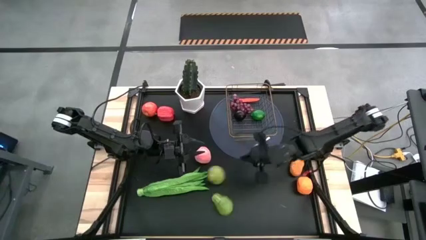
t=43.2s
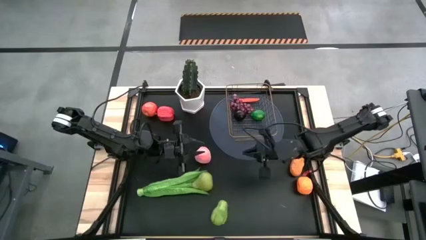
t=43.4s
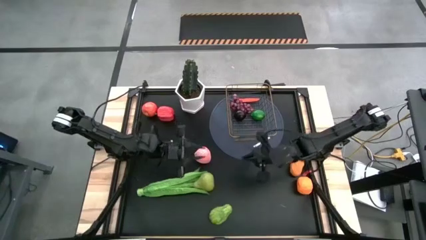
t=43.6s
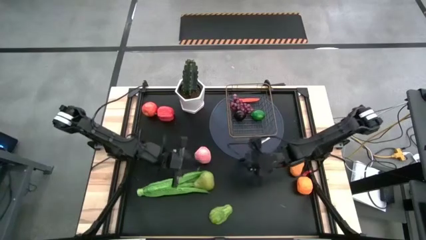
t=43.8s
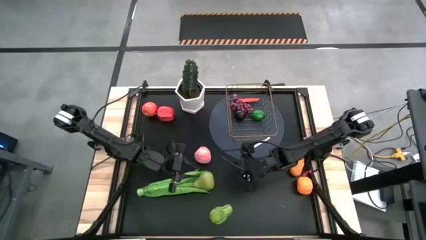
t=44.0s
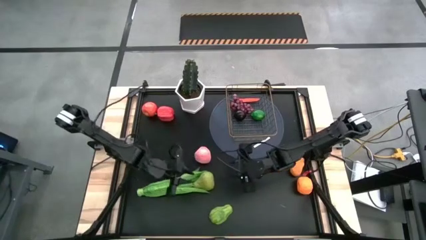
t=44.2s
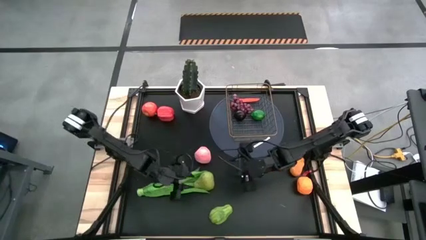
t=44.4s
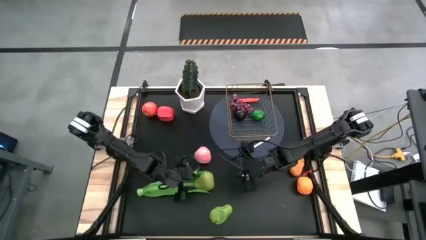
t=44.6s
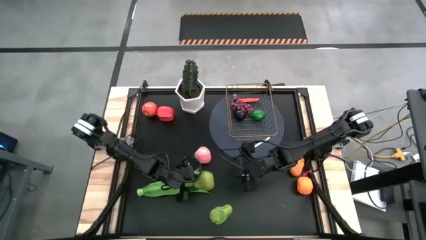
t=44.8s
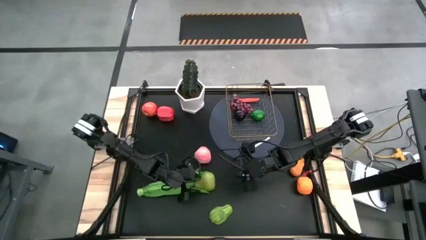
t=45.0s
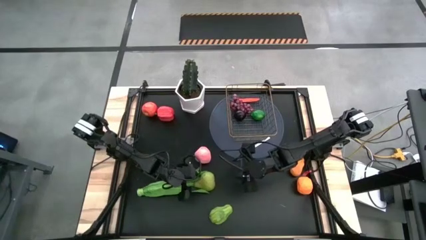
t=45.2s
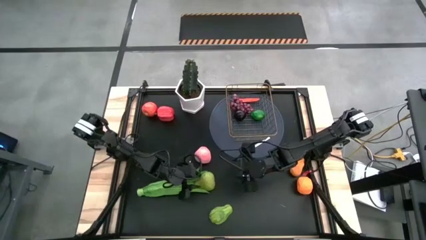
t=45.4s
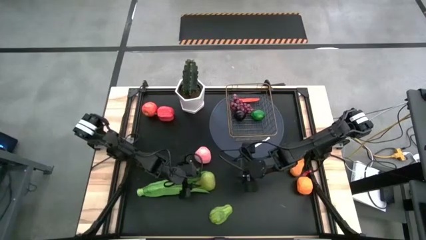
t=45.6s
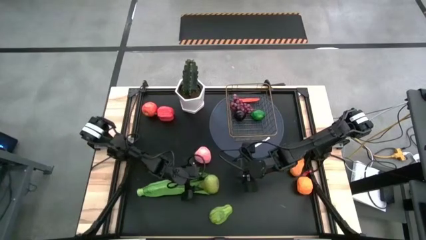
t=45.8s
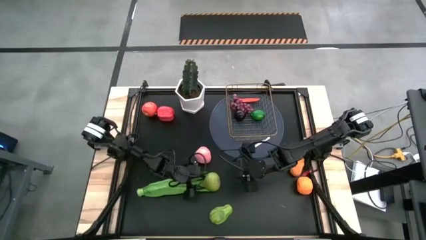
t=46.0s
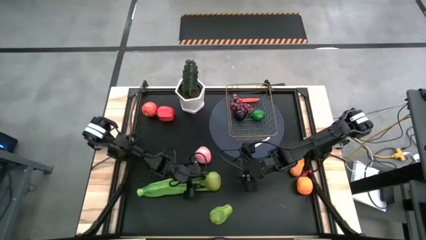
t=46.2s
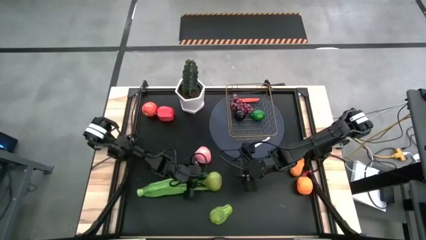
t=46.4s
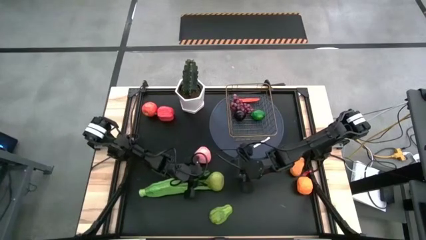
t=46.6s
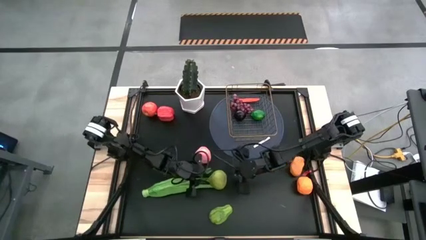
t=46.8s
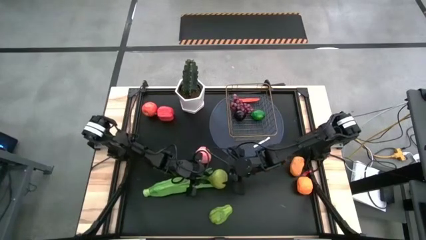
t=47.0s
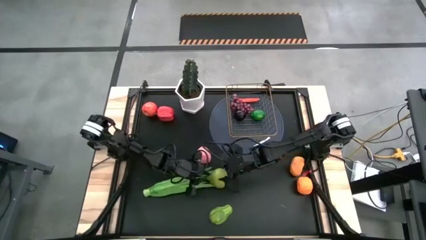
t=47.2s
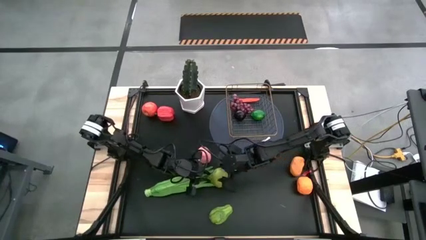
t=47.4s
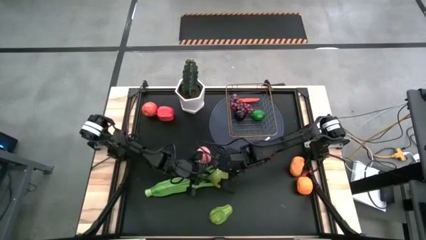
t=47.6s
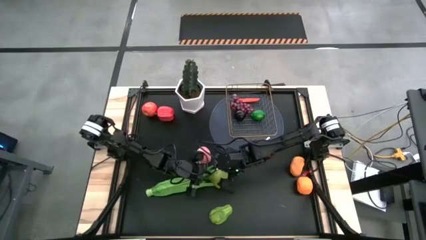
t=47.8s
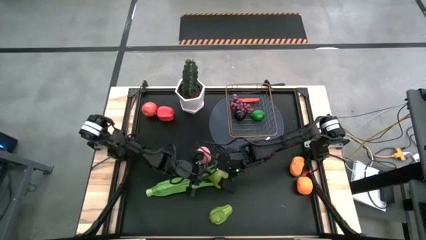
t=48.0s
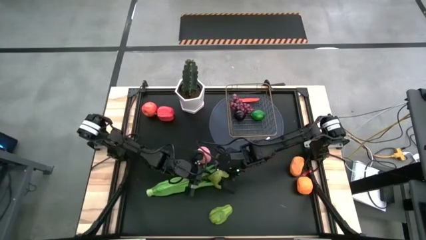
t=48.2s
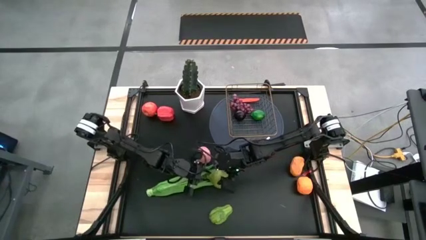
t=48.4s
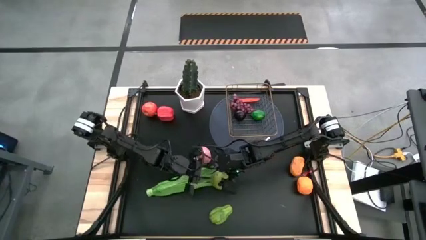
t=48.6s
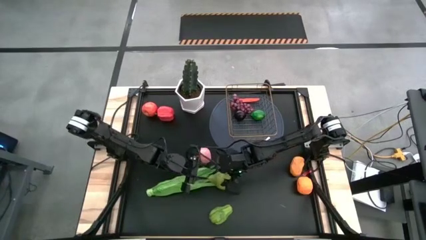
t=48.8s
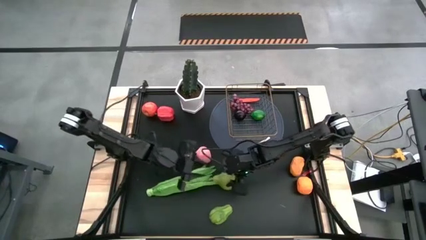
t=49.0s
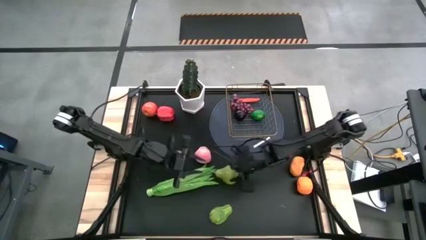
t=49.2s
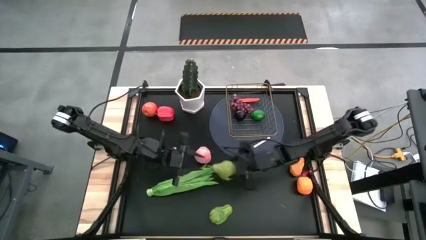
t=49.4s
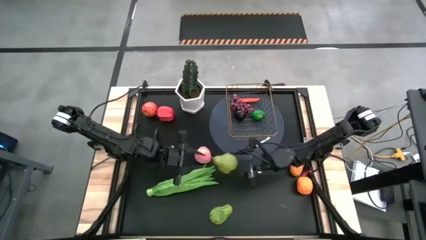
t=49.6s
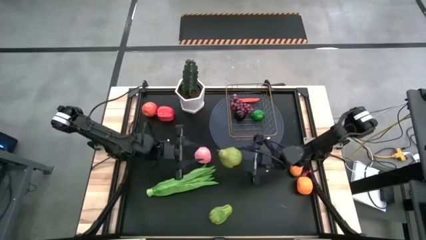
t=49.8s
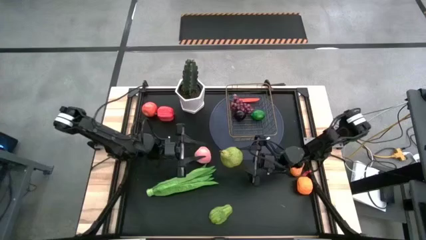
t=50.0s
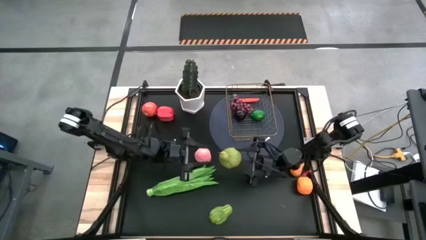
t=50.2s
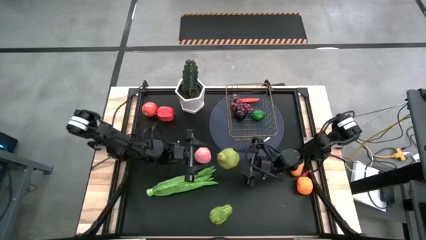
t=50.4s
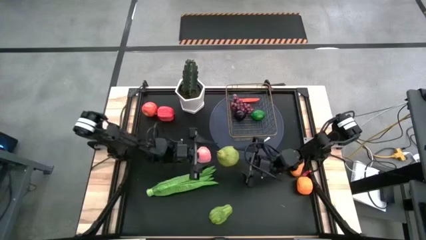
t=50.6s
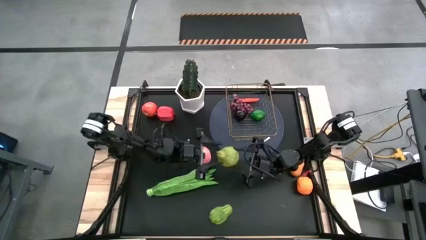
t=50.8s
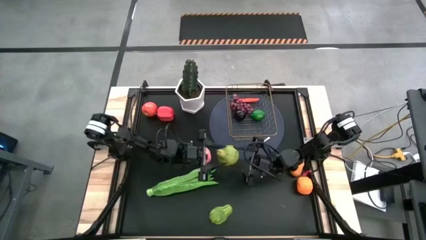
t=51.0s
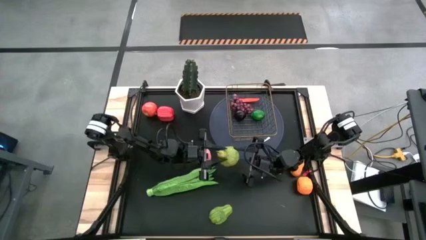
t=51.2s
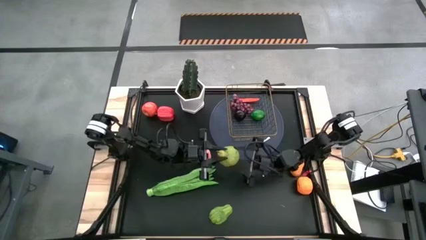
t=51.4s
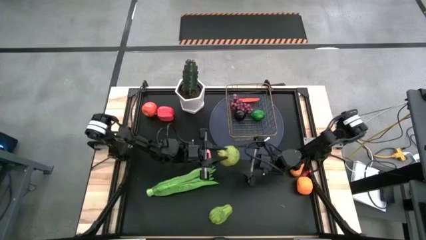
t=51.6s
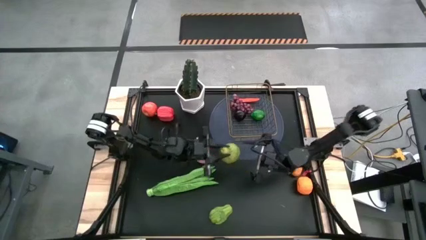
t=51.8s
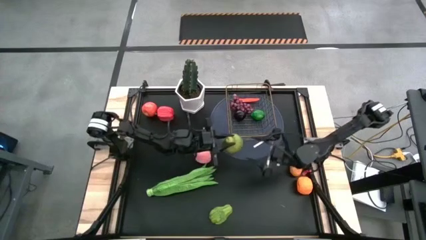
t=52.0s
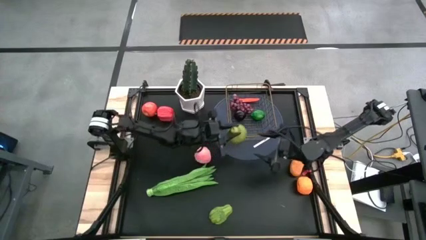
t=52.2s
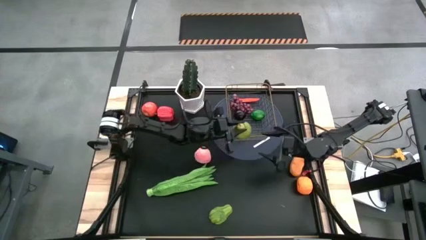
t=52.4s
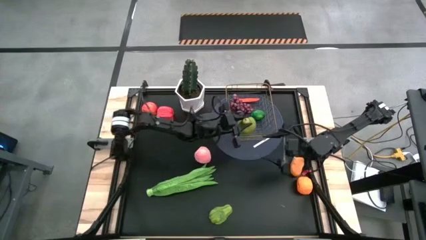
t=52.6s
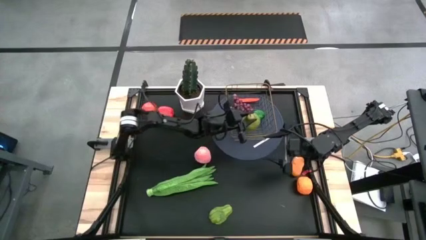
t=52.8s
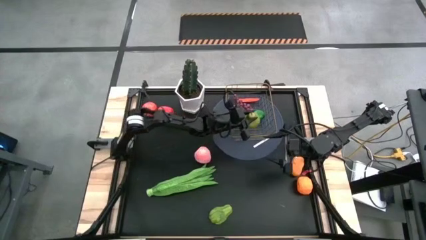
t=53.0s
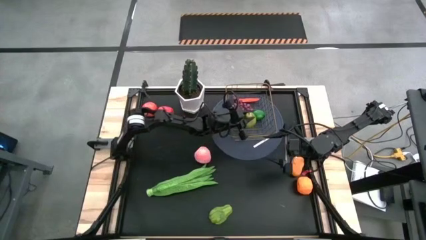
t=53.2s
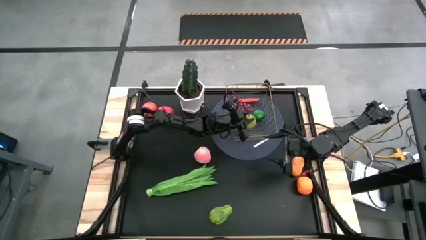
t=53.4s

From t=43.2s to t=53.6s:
Task: Build produce basket
Put the green pear into the gold wire basket

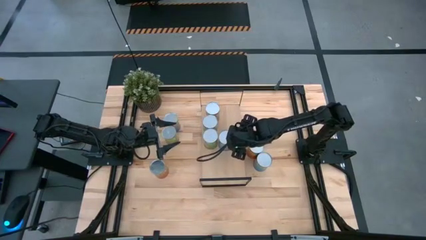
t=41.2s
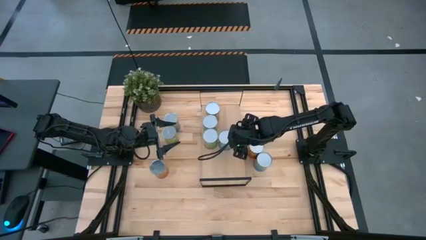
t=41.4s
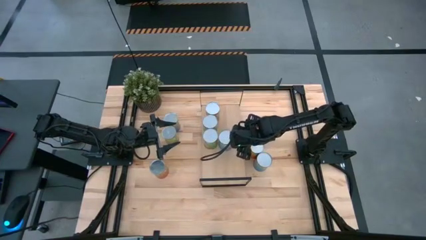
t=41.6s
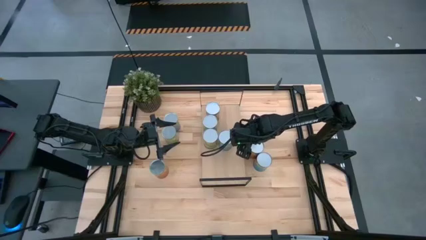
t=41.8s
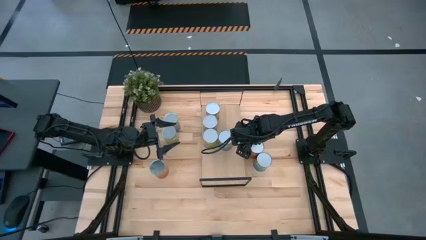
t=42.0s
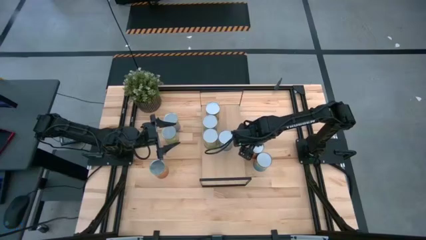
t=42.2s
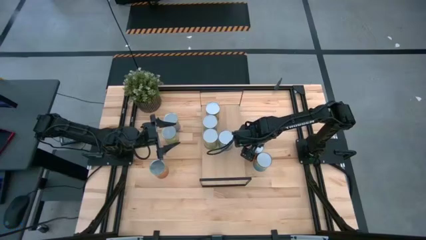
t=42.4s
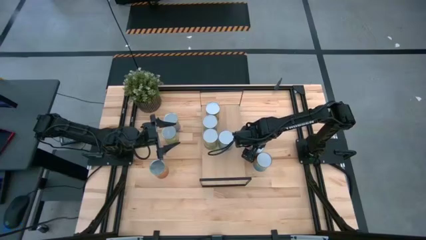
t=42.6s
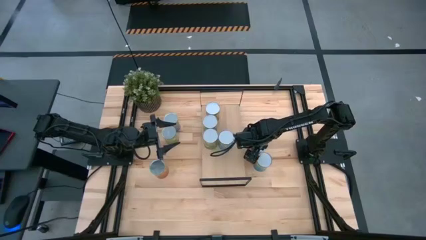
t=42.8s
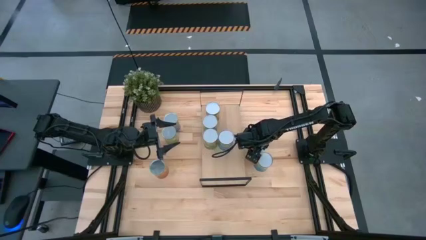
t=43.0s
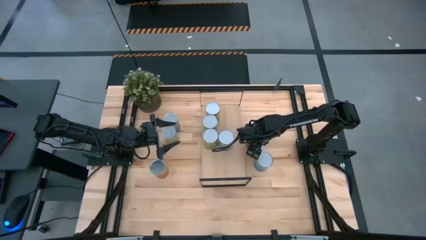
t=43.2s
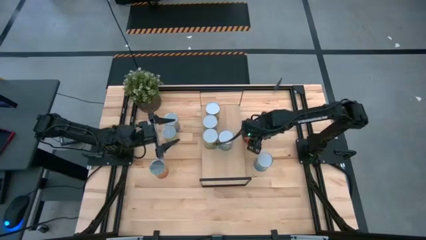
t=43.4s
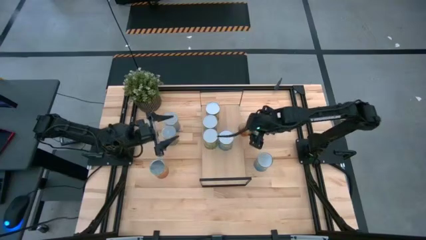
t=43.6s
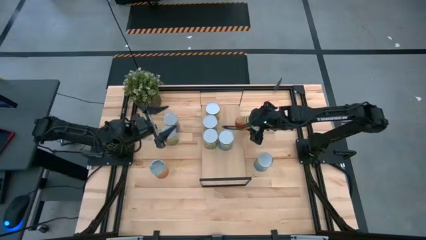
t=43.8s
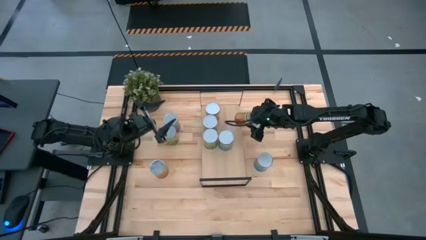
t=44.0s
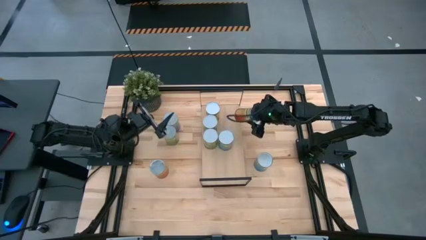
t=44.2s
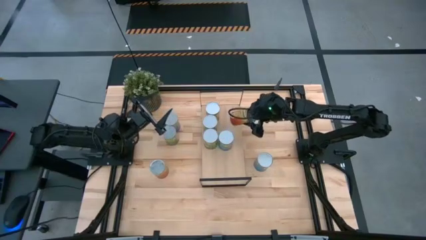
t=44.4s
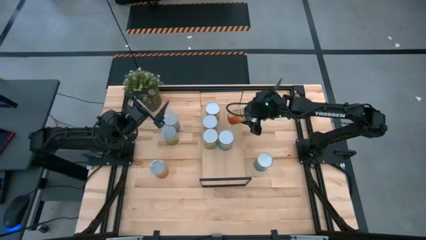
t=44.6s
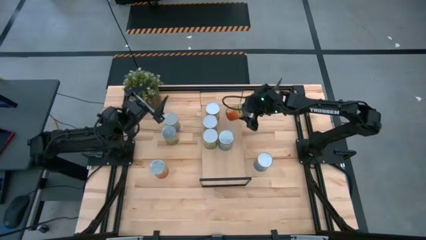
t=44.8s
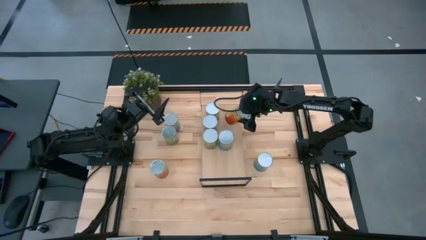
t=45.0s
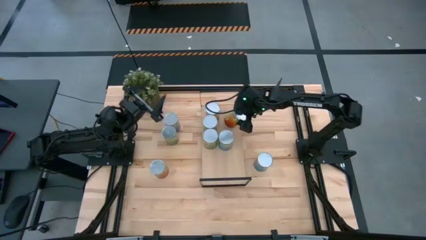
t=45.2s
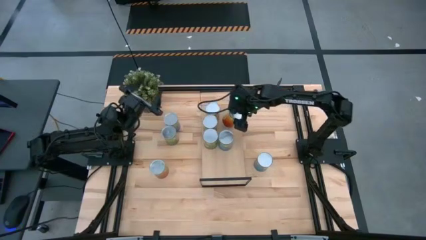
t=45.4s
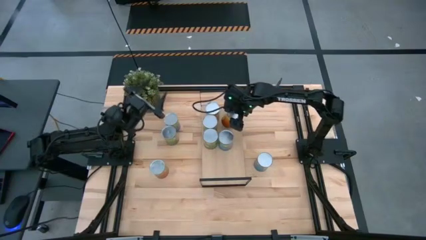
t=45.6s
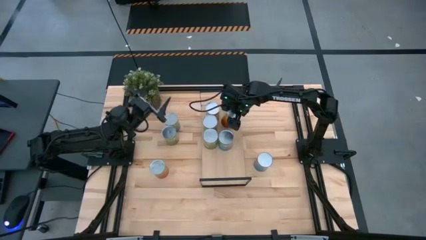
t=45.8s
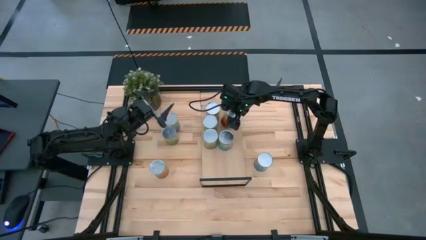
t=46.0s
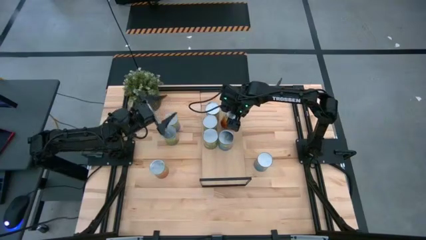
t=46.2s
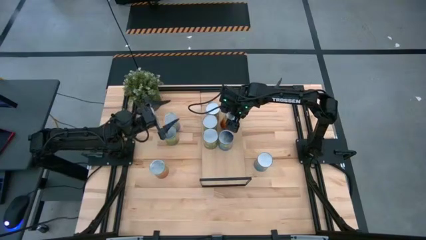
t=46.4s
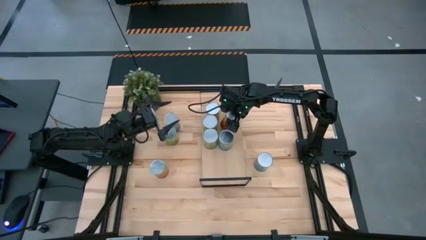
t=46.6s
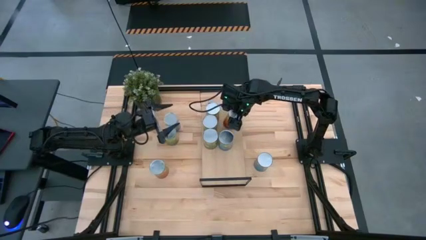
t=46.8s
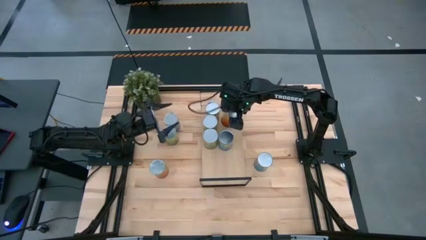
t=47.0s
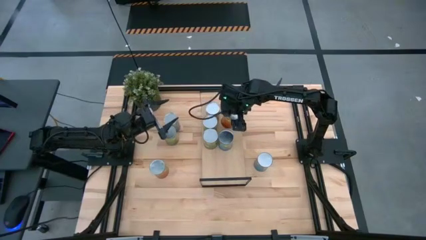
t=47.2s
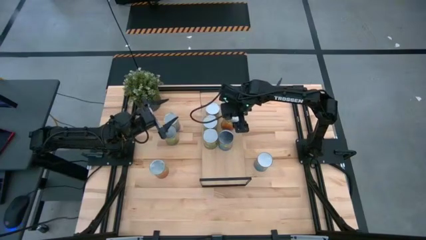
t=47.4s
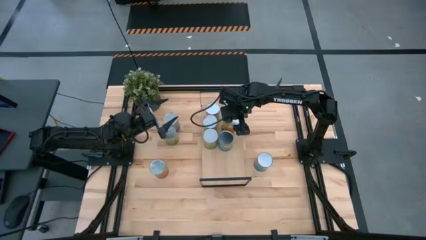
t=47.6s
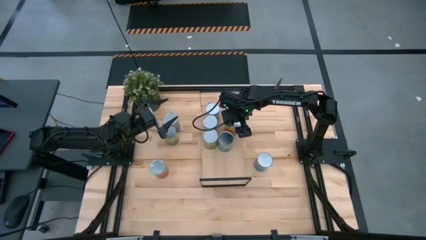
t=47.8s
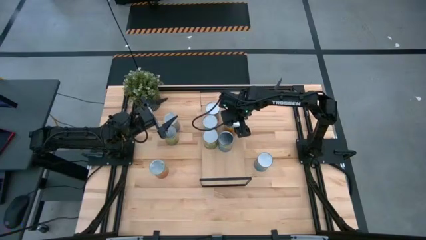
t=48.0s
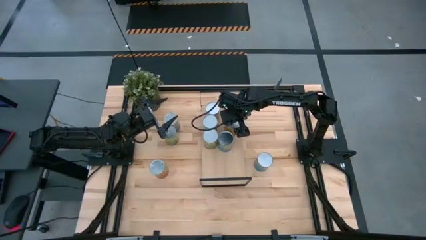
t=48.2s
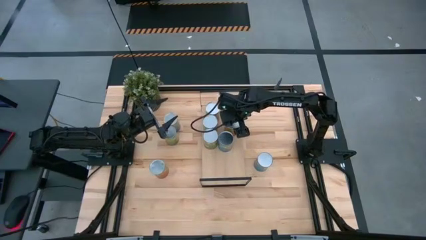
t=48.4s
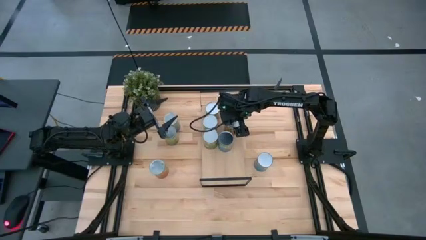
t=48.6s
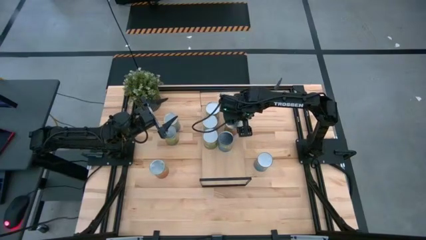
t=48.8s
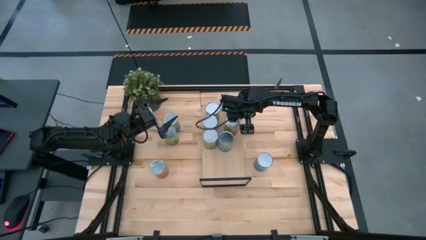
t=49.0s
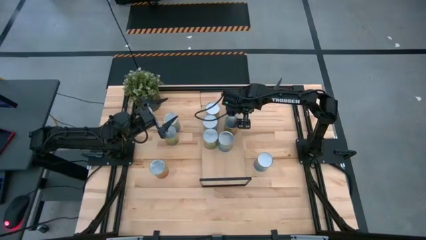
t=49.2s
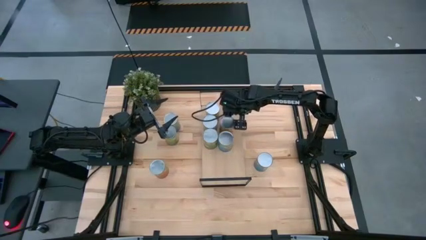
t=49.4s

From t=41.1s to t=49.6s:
Task: Pick and place cans onto a shelf
Put the top canned pineapple on the shelf
